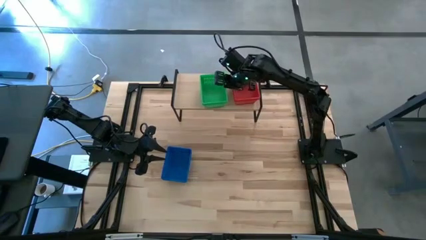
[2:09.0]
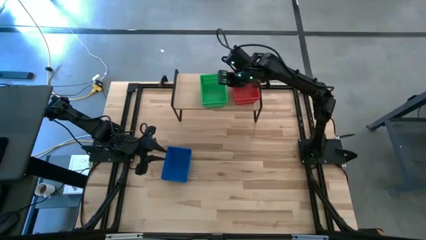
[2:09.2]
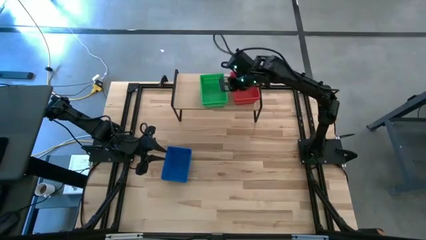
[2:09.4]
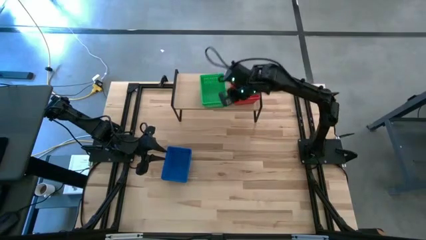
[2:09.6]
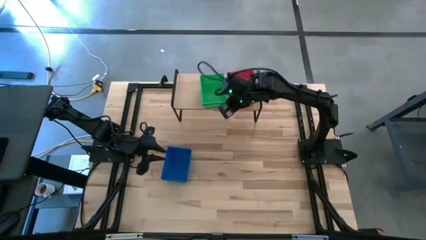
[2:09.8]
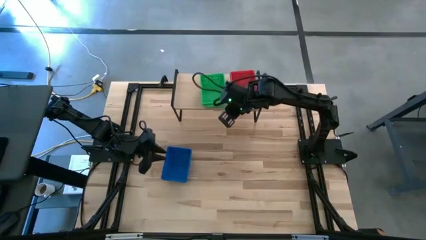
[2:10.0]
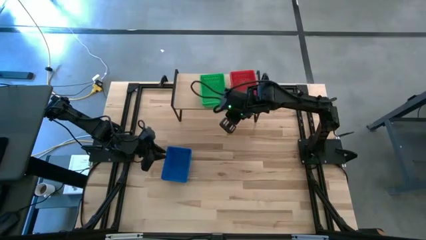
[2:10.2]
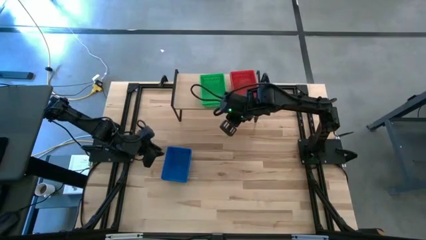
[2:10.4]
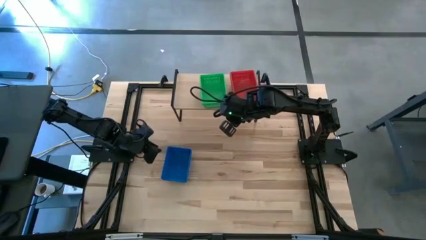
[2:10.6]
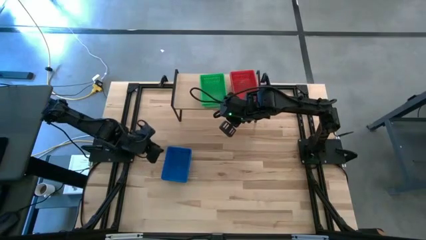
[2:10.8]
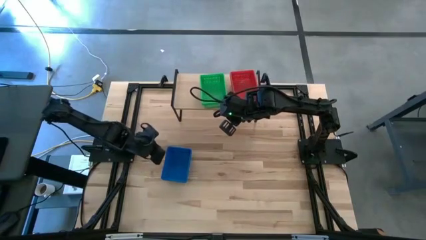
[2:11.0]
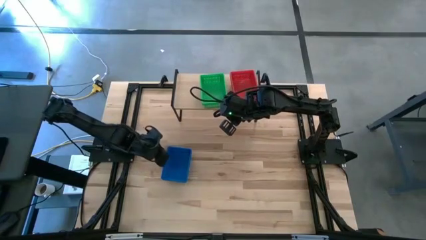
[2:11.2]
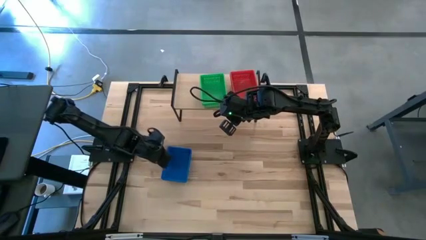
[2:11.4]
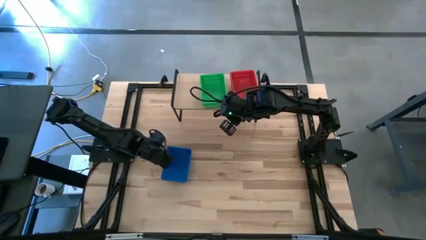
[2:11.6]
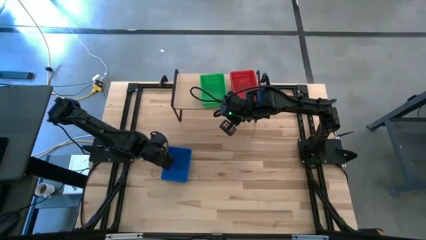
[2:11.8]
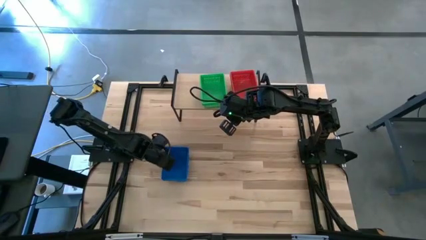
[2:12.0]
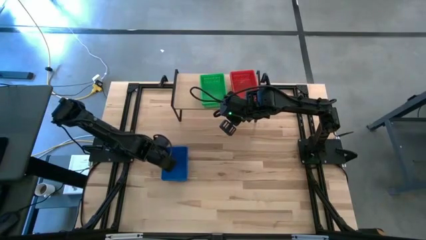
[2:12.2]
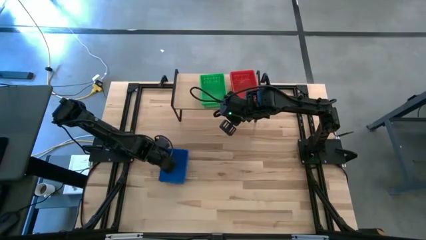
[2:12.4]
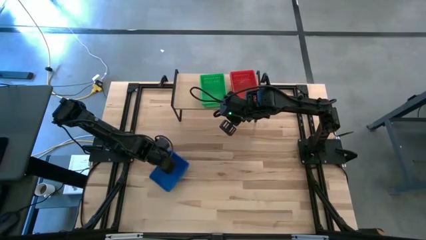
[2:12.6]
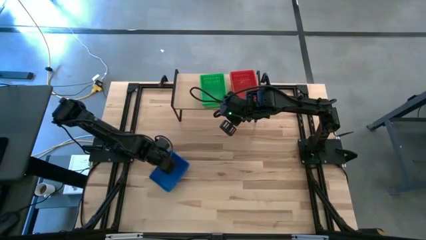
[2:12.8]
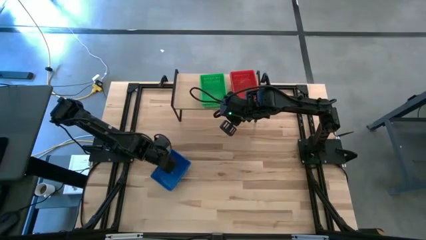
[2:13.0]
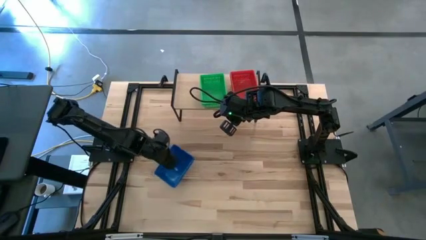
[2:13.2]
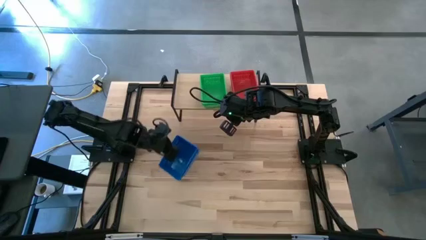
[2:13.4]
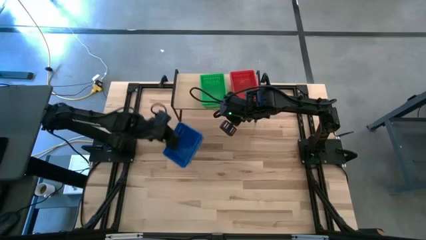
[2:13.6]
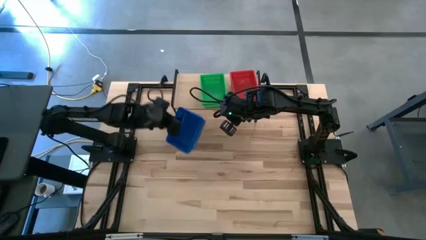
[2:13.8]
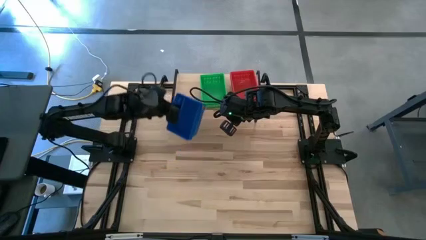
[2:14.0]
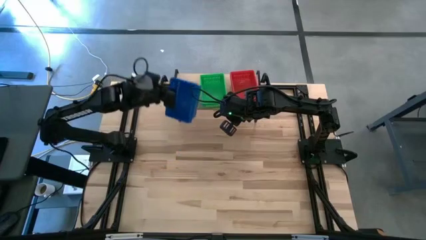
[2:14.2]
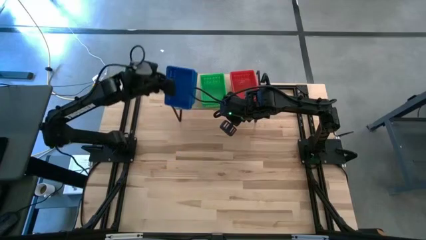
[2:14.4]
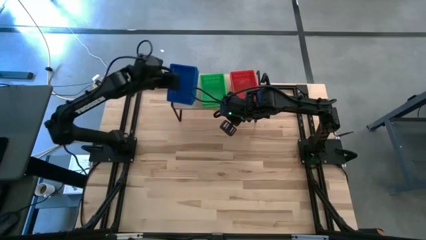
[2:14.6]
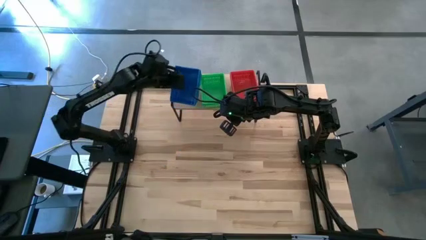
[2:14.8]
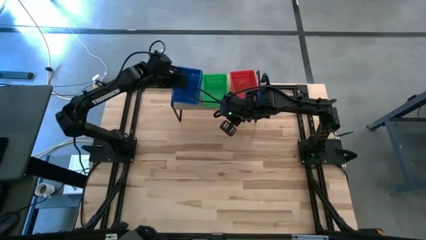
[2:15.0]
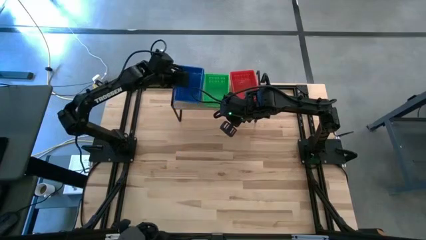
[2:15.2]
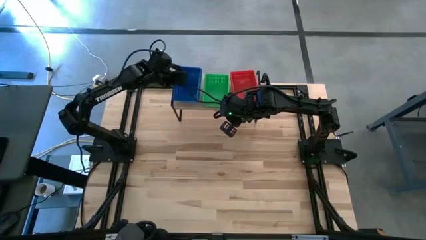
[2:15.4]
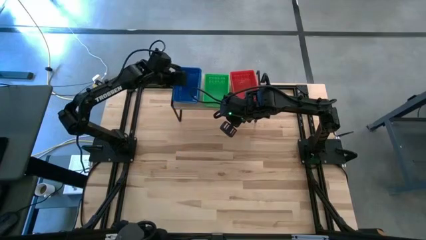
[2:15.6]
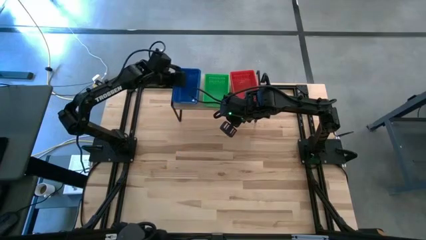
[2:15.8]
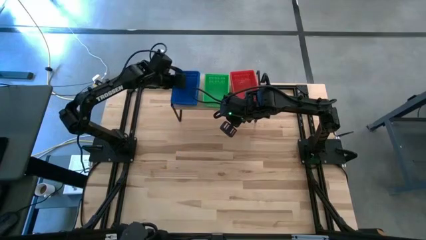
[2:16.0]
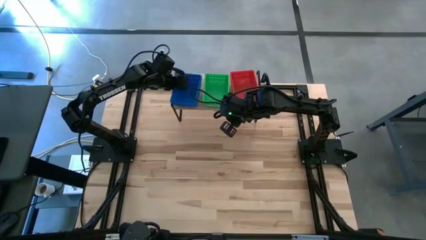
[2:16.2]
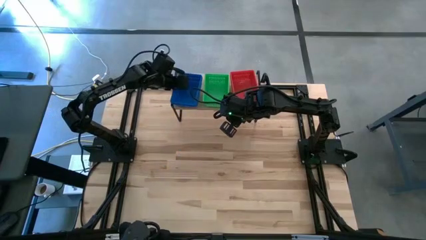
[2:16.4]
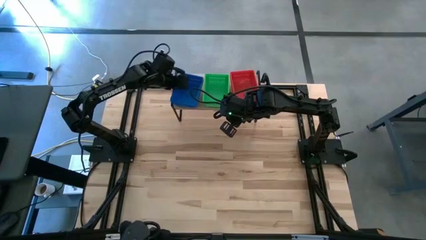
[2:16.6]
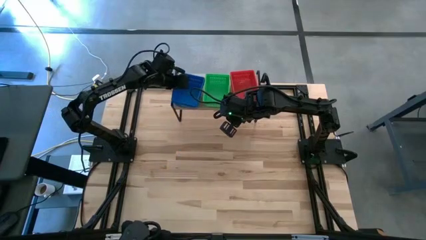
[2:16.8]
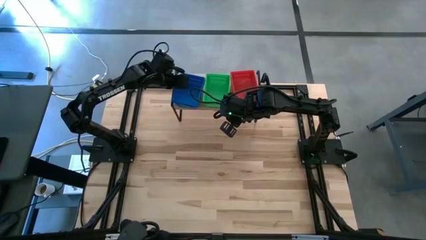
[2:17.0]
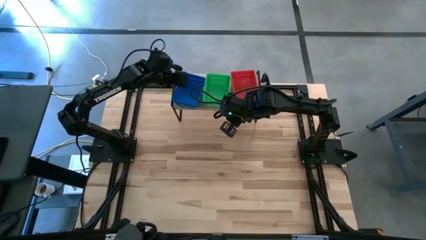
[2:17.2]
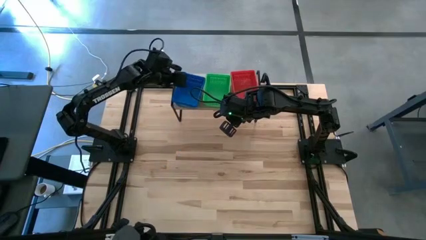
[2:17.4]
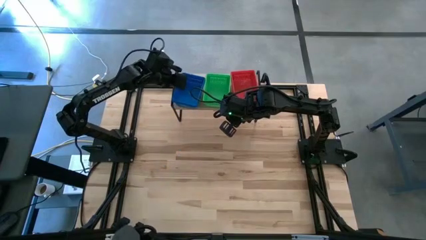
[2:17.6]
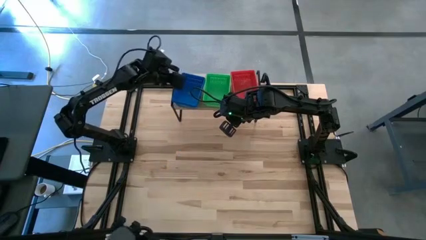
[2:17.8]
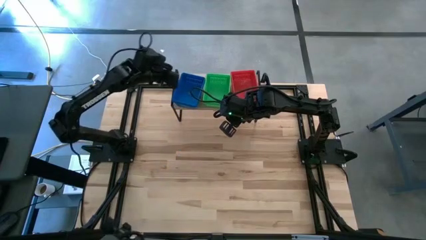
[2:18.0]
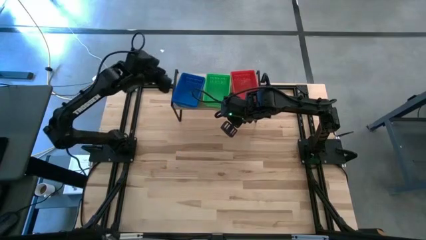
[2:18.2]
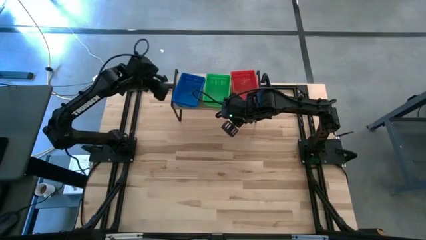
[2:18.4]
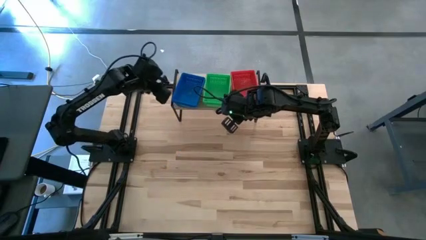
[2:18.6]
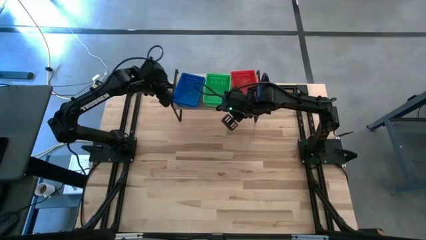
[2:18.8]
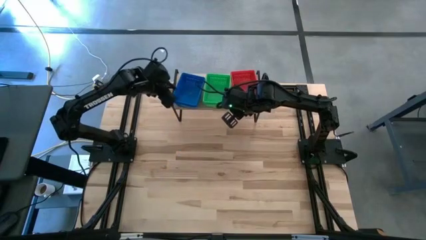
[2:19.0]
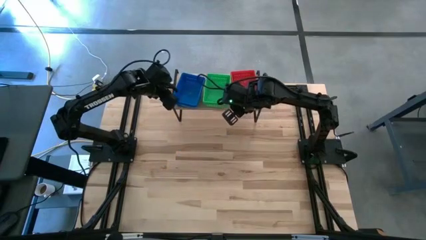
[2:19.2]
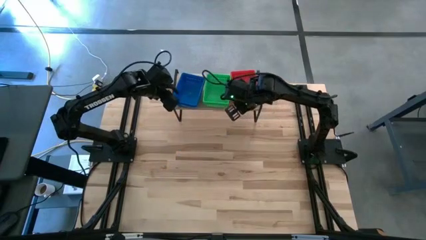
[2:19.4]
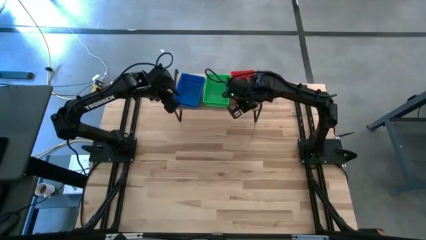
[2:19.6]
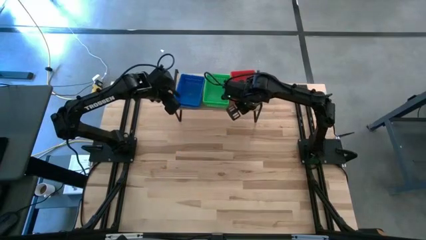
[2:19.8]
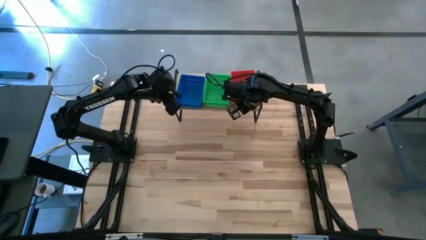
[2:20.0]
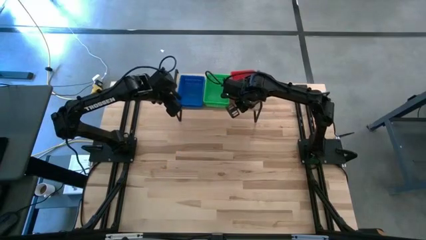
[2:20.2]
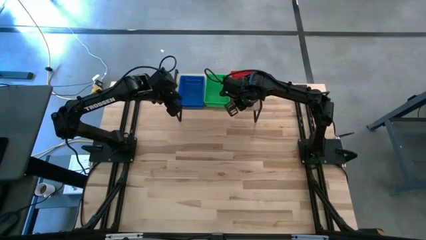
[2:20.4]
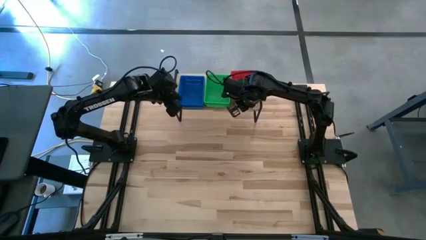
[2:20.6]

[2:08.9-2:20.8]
Task: Stack baskets on shelf by color
Put the stacked blue baskets on the shelf

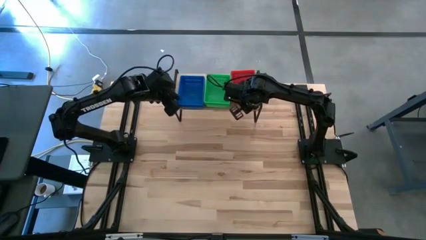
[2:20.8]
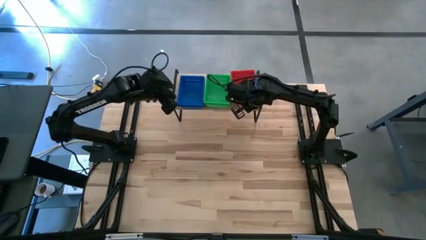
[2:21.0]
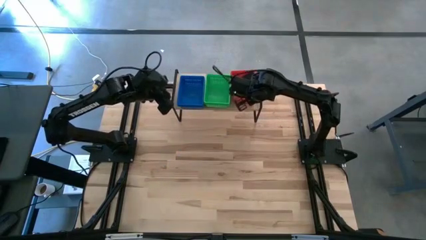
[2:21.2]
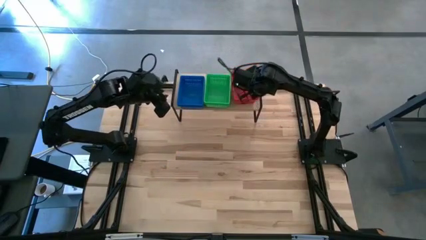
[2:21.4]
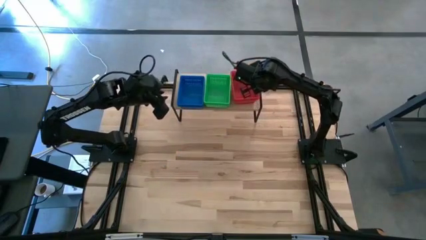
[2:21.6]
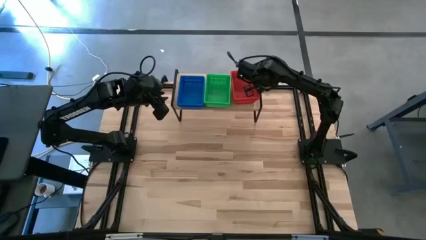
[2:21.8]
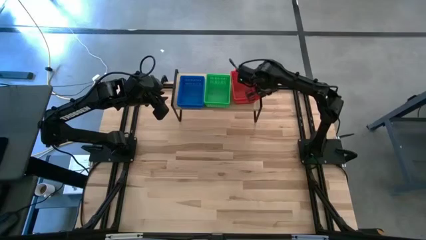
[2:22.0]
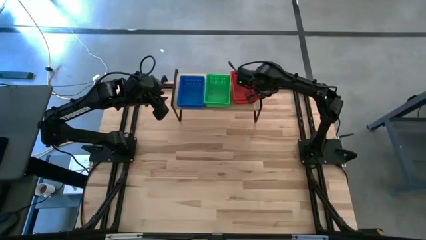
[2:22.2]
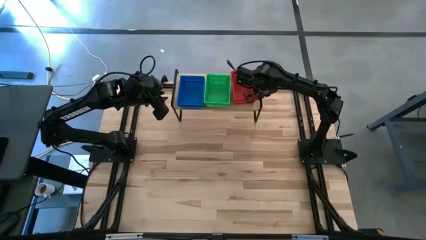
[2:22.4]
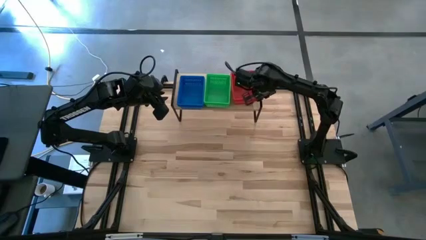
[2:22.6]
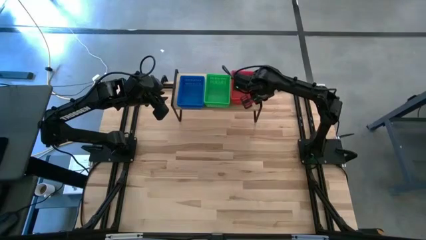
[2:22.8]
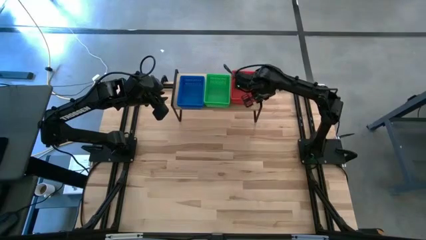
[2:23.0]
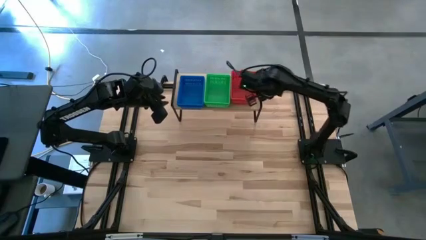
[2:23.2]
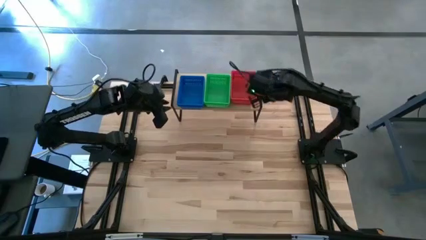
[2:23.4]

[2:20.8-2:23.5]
Adjust the stacked red baskets on the shelf

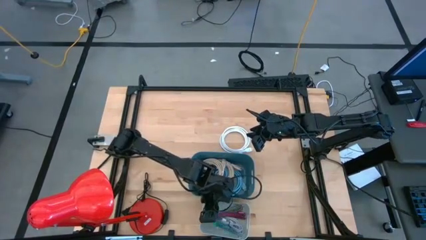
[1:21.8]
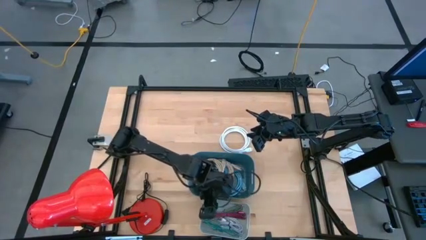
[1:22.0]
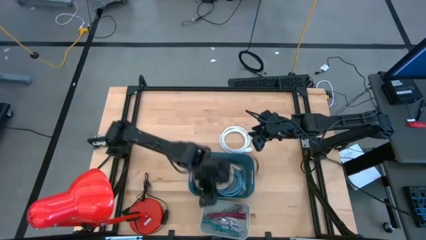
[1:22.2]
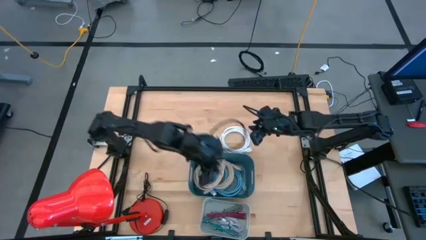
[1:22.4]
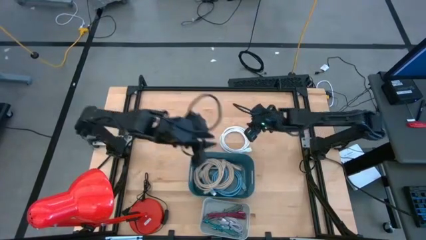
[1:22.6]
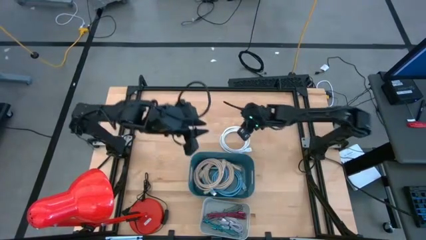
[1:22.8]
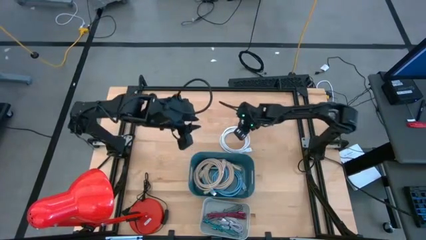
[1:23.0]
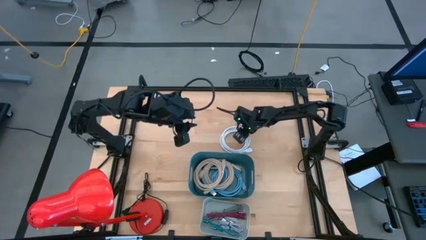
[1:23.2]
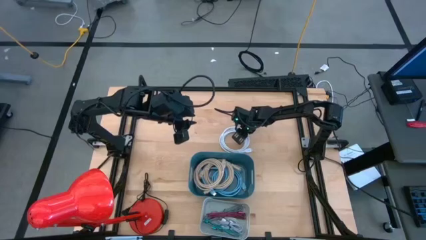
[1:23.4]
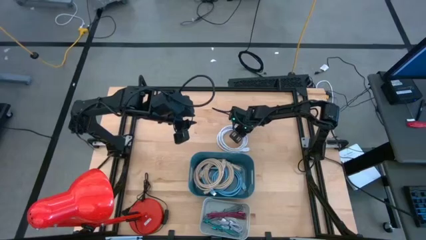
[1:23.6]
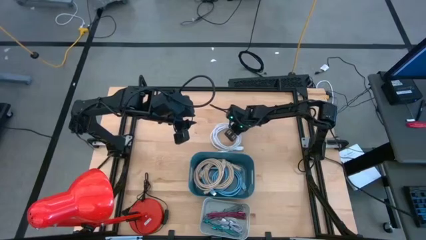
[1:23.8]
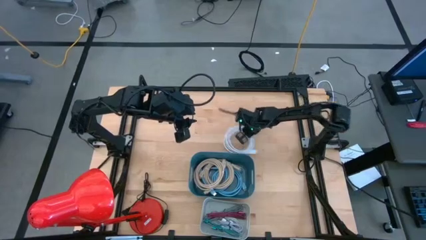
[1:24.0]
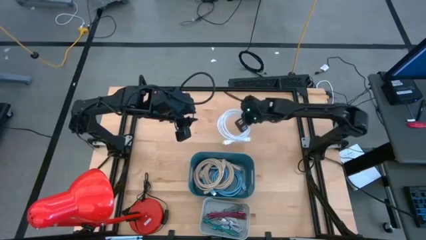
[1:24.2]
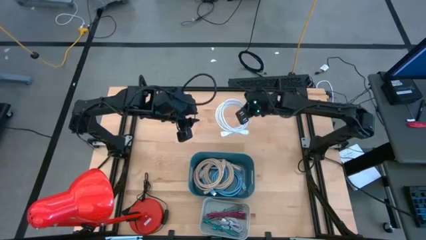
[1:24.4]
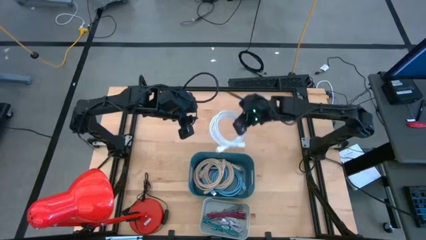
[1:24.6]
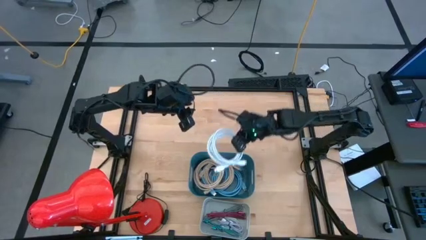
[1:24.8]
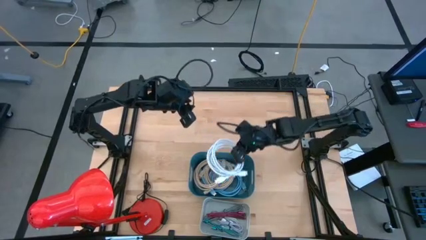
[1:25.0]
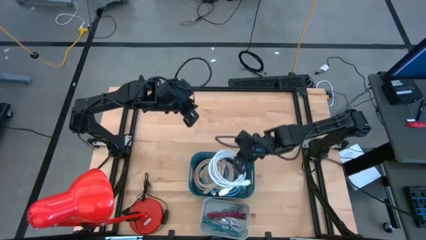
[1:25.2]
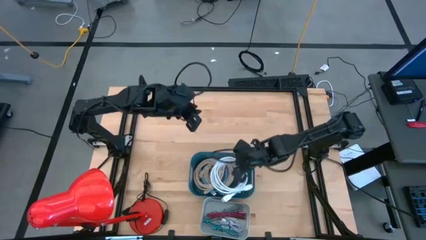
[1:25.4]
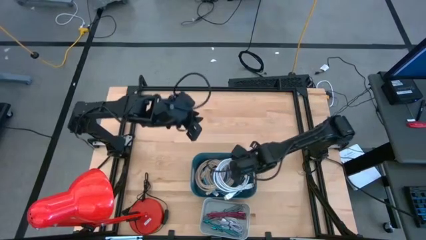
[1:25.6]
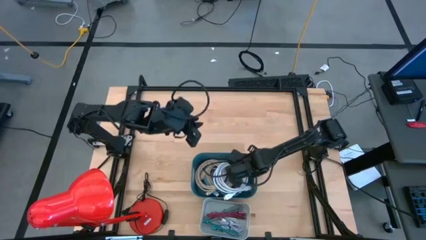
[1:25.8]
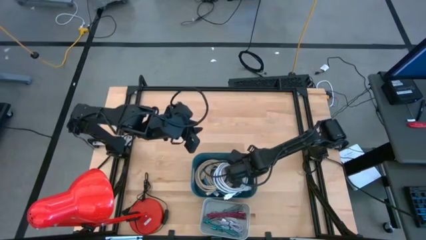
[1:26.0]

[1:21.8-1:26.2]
Task: Pick & Place USB Port
Put the white HDMI cable into the blue bin
